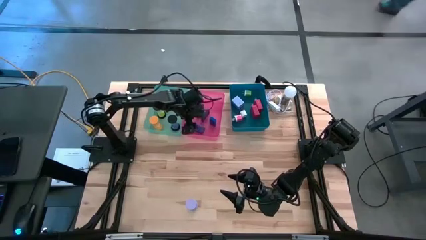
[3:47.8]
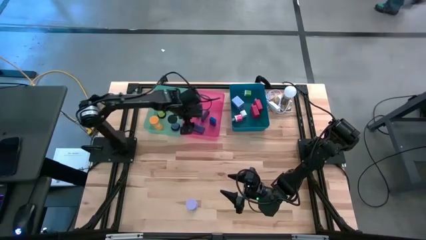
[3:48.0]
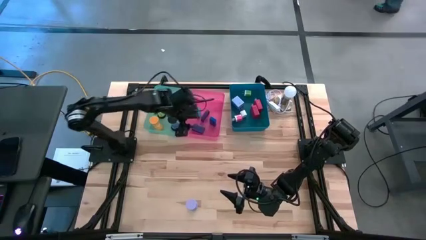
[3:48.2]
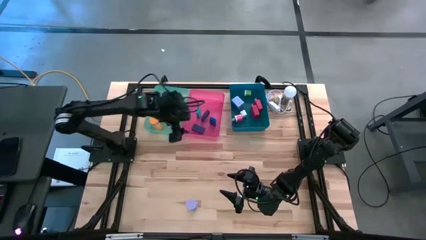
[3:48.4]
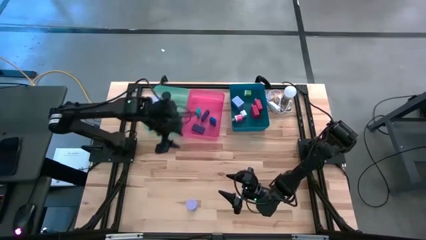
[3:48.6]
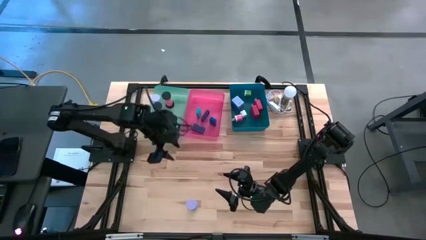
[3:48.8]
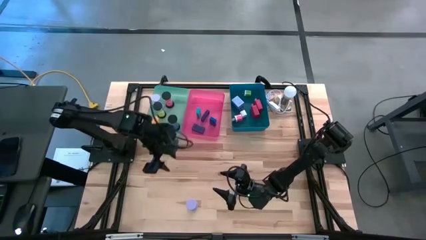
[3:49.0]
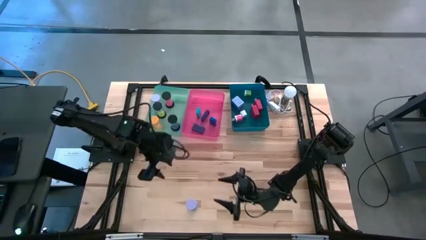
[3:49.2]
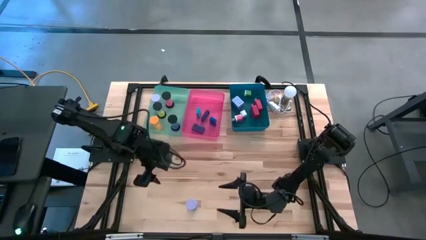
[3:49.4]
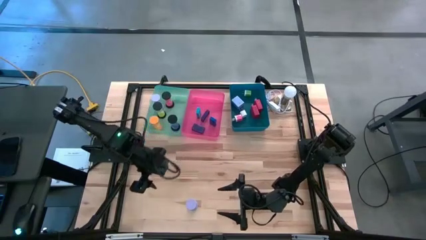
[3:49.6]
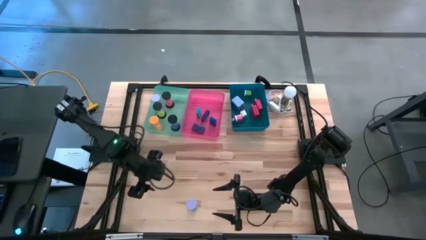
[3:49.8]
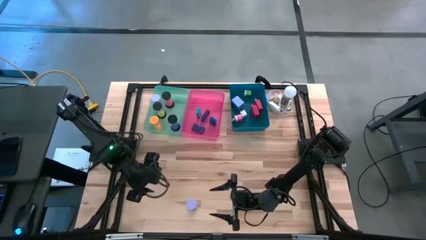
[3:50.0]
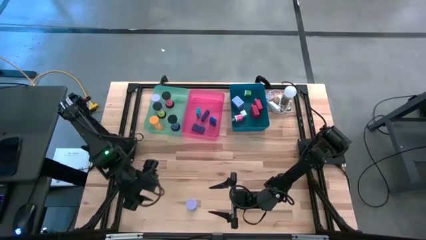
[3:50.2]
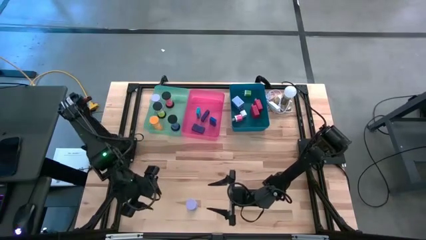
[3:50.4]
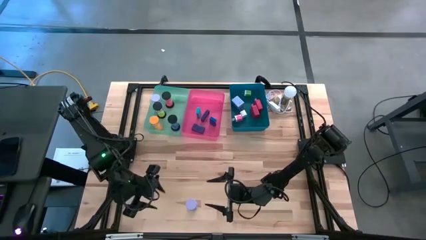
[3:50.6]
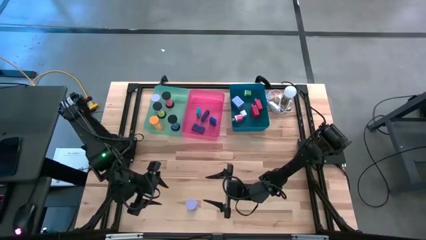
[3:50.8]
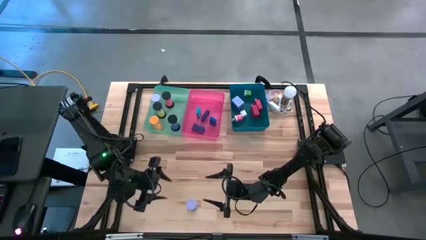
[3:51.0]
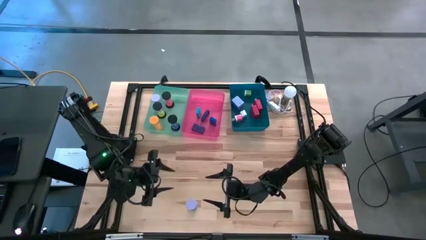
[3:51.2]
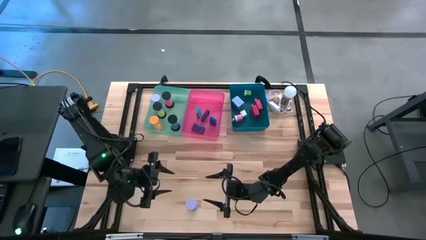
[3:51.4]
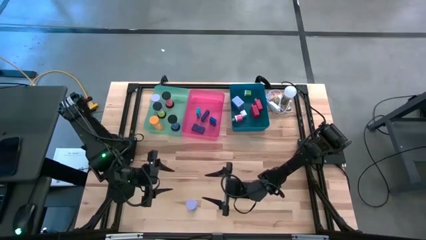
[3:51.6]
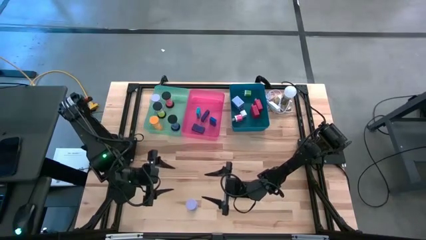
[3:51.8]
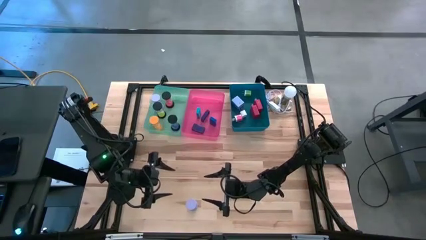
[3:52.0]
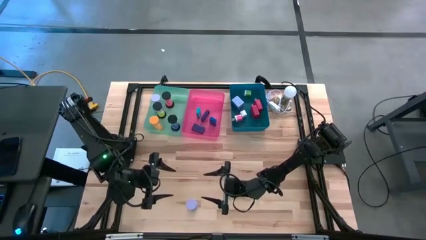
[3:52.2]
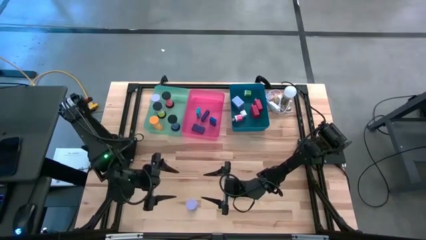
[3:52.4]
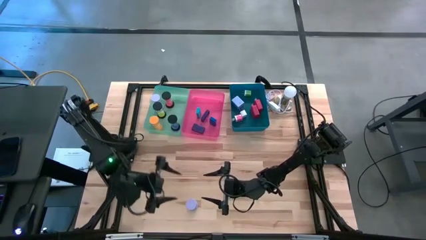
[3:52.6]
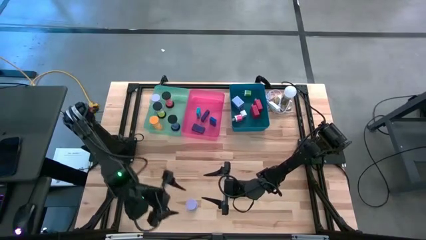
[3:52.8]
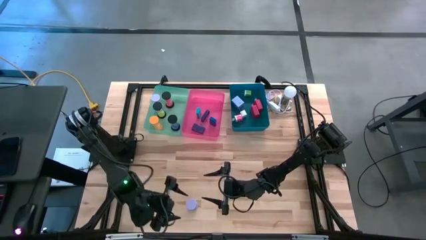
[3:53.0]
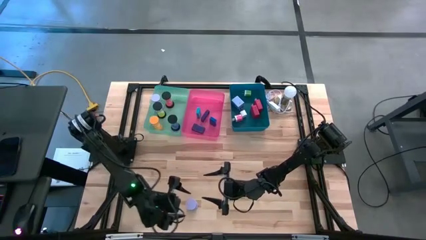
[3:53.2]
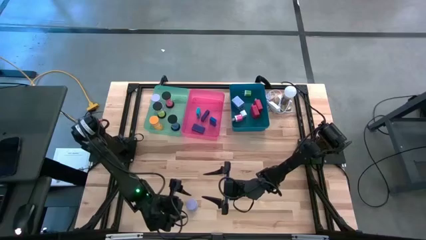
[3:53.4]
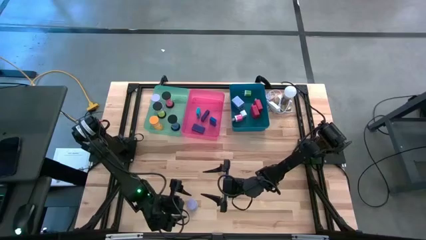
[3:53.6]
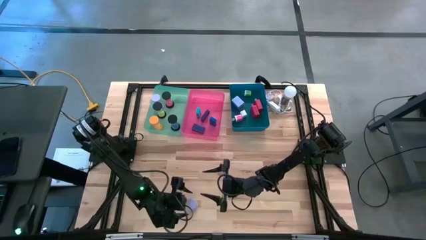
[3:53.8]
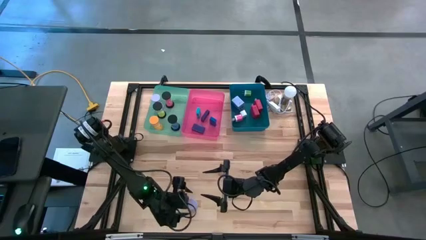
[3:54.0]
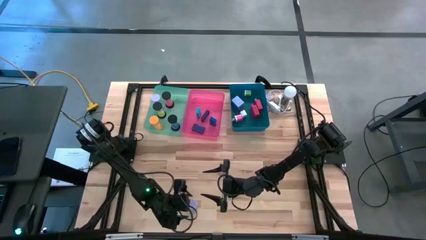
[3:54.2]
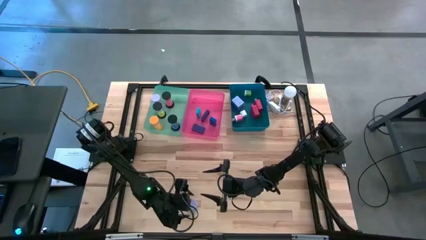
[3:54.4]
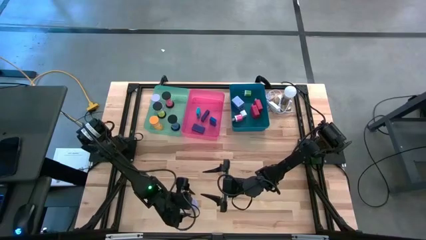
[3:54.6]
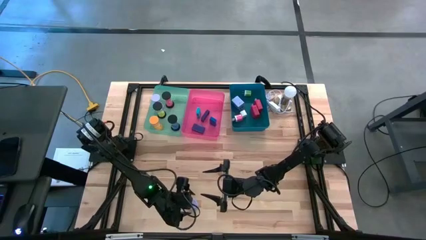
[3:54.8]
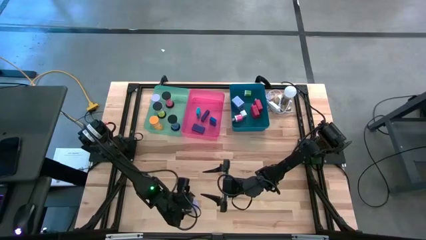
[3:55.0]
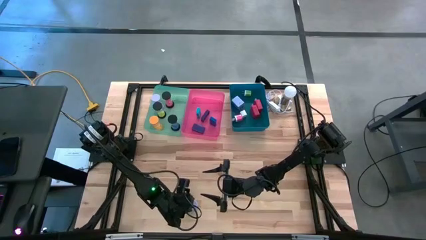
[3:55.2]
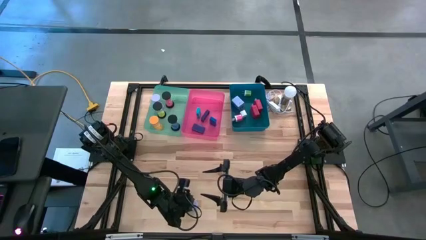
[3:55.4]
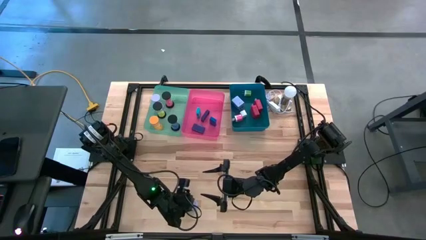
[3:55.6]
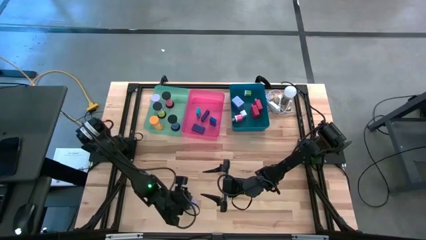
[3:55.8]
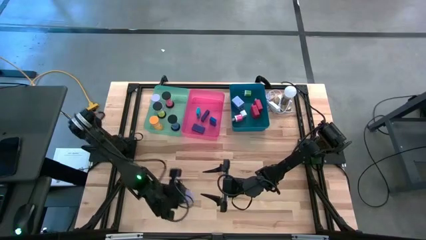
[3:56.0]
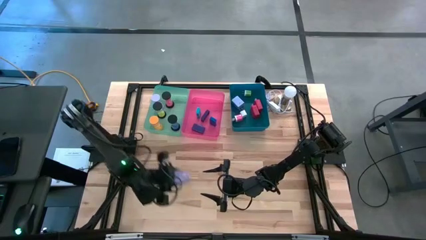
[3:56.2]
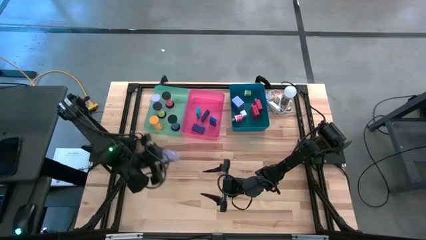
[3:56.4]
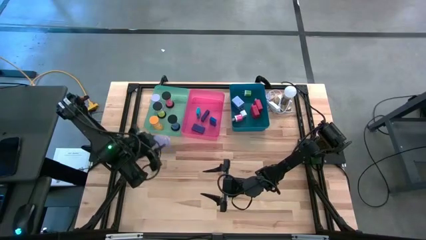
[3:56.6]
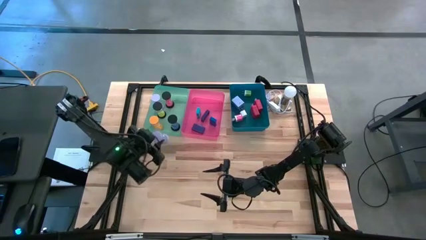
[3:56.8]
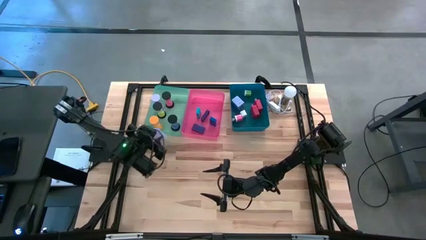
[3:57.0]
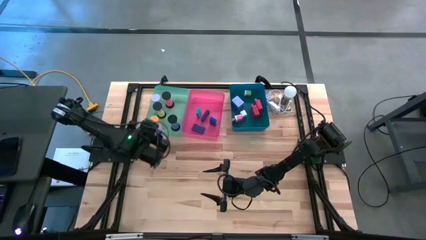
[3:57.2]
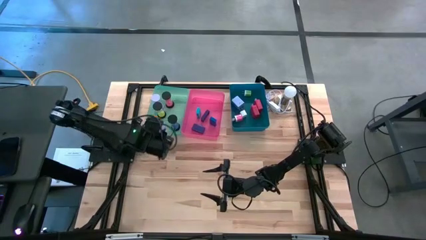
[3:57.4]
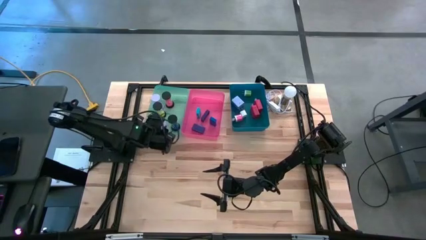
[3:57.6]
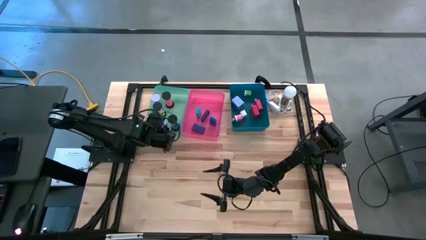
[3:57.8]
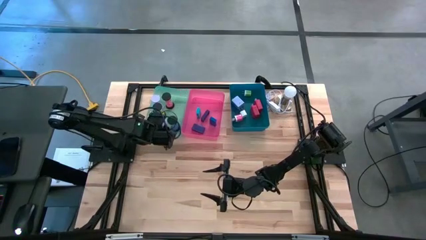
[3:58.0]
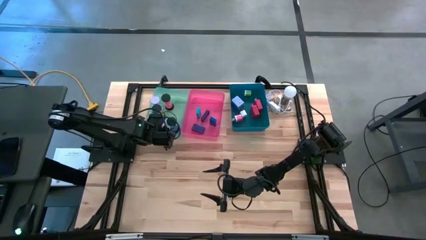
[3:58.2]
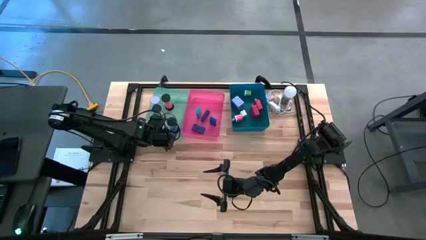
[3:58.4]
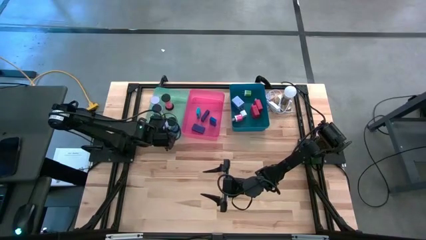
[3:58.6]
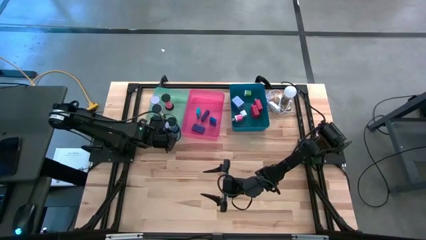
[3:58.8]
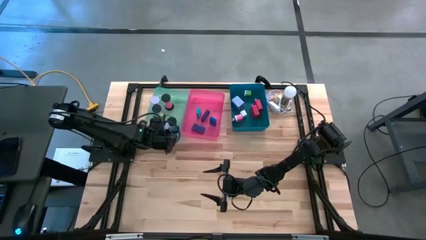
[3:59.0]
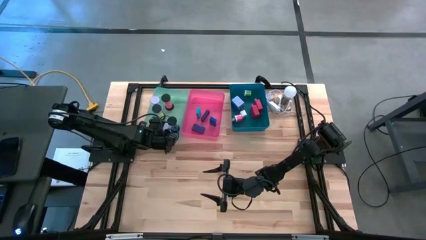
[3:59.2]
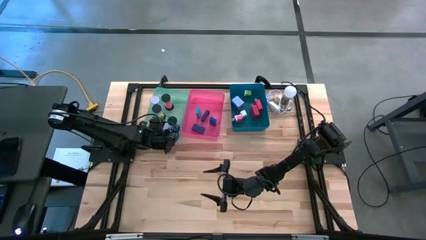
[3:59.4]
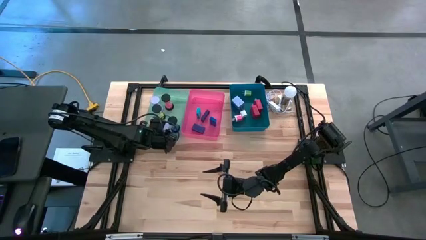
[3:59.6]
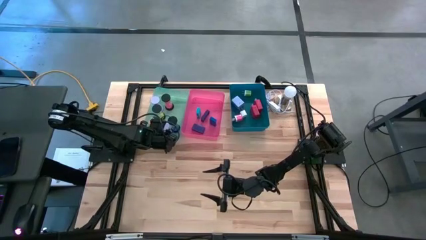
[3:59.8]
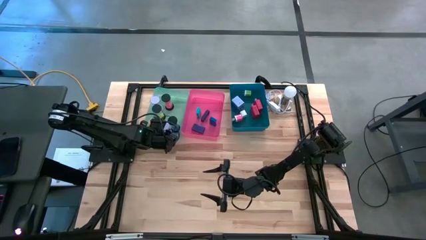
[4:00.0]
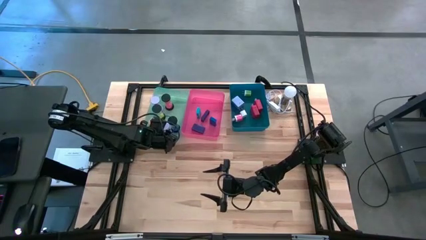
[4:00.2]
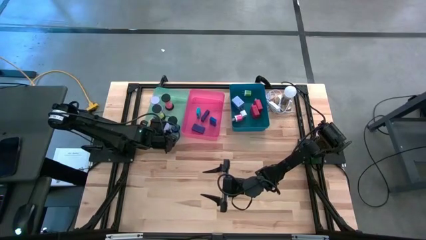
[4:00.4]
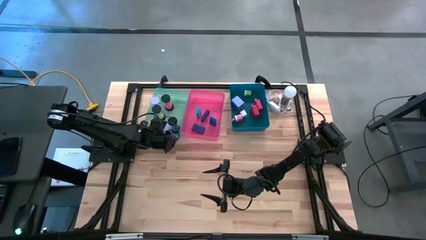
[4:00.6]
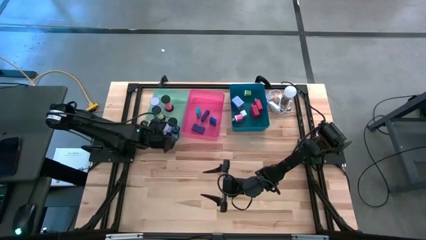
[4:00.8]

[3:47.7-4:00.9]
Task: Pick & Place Office items
Put the light purple hourglass into the green bin
